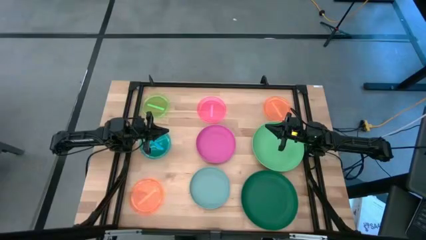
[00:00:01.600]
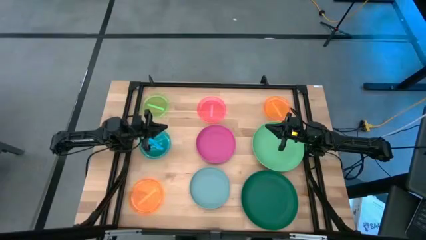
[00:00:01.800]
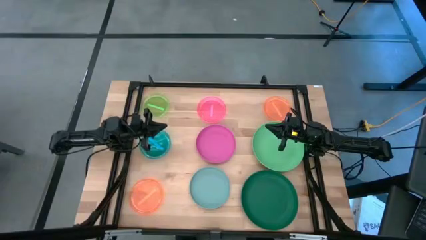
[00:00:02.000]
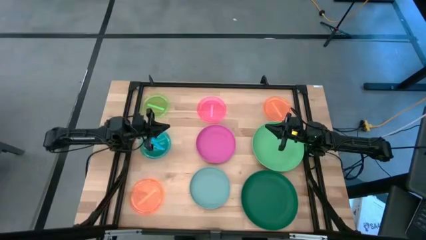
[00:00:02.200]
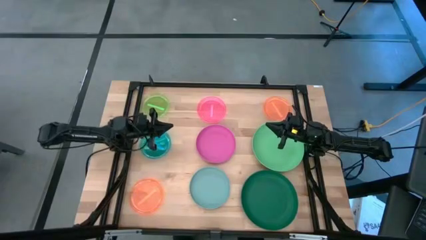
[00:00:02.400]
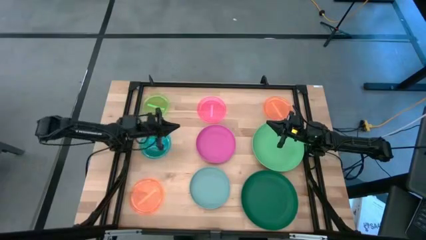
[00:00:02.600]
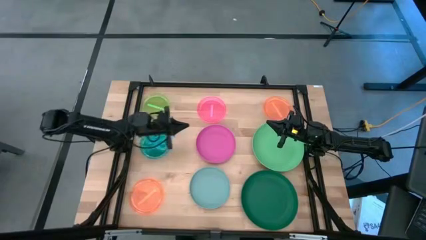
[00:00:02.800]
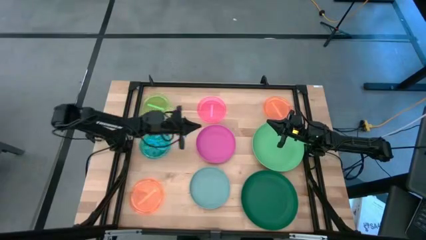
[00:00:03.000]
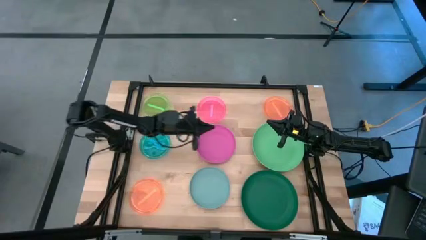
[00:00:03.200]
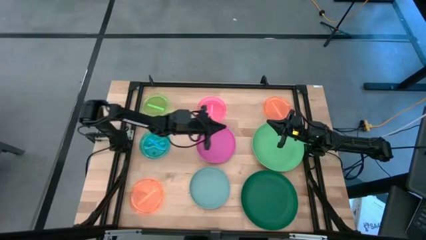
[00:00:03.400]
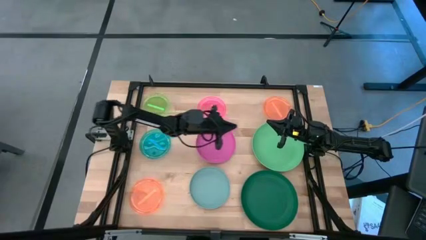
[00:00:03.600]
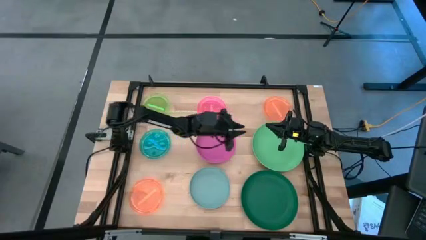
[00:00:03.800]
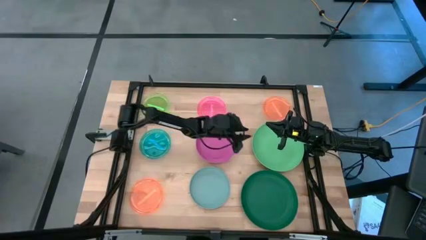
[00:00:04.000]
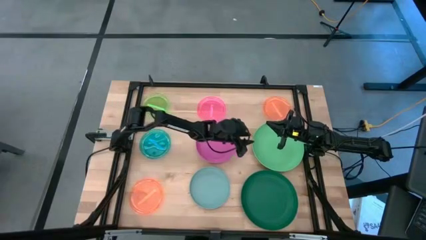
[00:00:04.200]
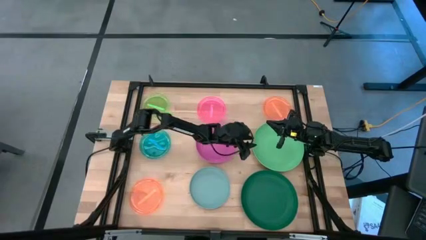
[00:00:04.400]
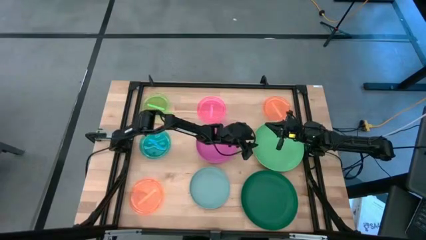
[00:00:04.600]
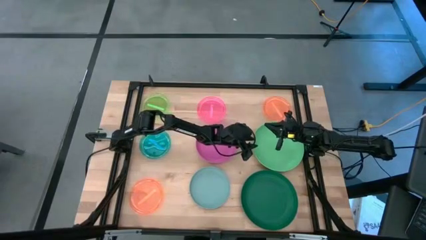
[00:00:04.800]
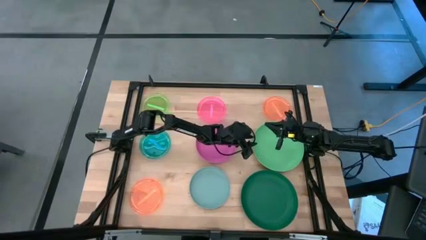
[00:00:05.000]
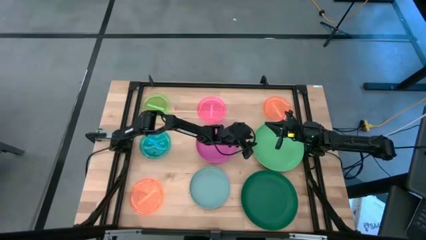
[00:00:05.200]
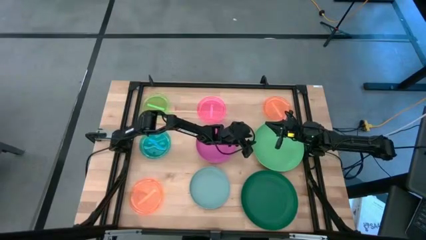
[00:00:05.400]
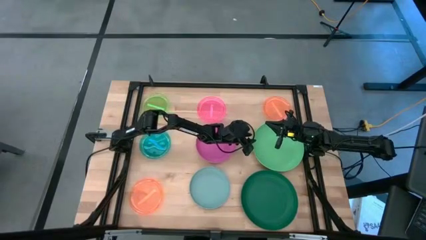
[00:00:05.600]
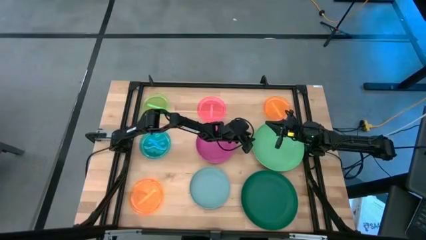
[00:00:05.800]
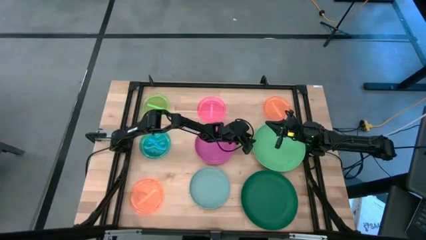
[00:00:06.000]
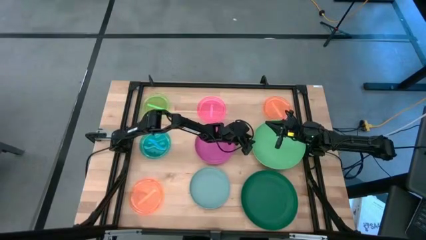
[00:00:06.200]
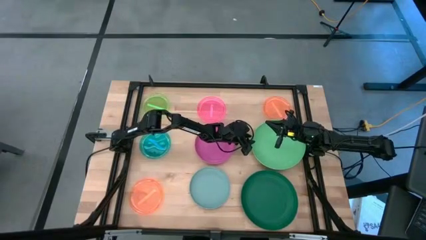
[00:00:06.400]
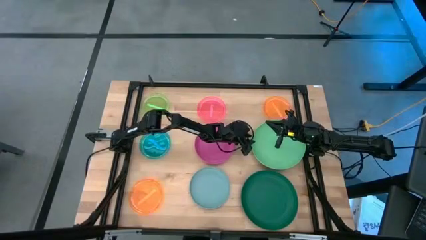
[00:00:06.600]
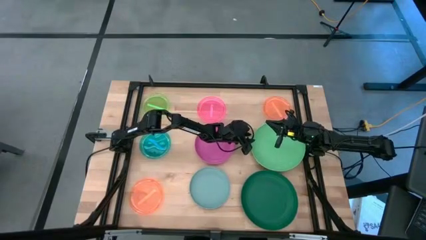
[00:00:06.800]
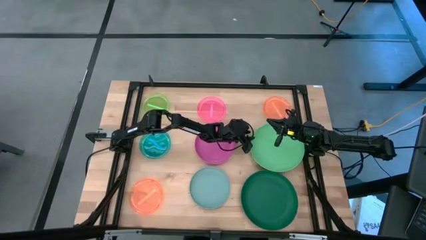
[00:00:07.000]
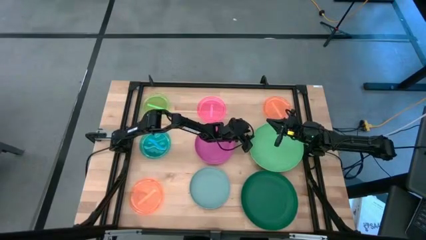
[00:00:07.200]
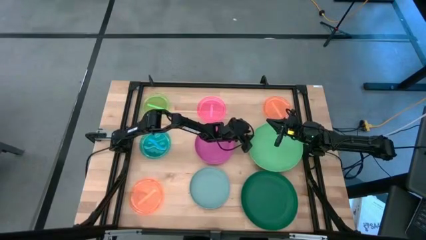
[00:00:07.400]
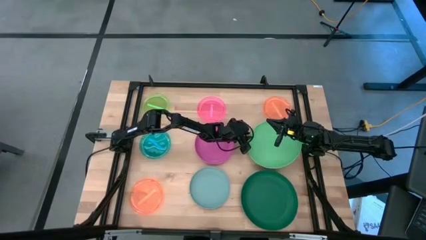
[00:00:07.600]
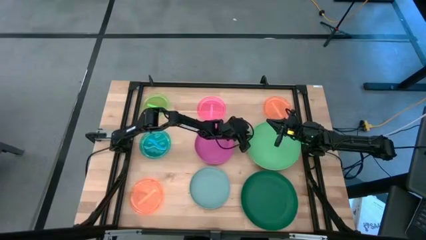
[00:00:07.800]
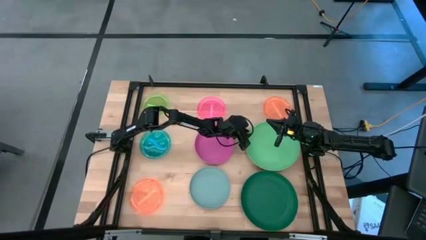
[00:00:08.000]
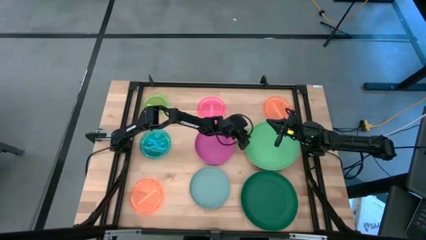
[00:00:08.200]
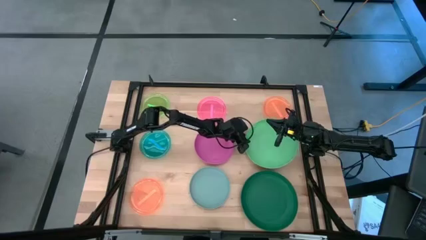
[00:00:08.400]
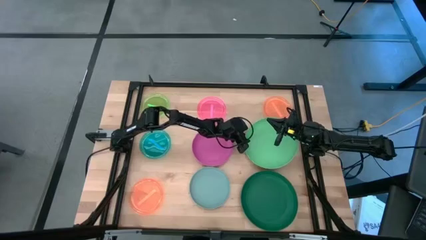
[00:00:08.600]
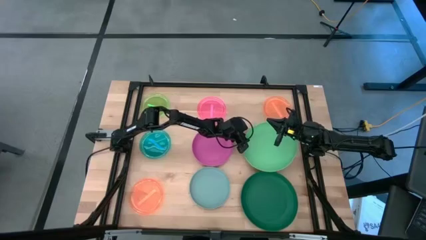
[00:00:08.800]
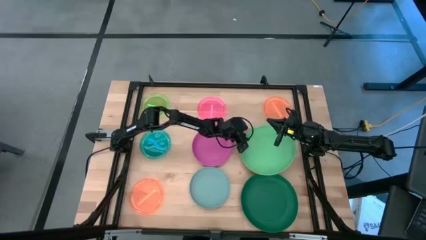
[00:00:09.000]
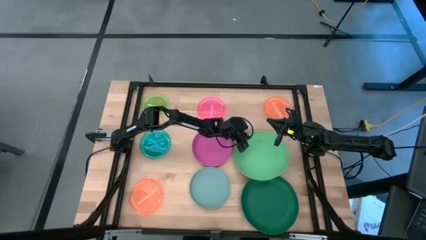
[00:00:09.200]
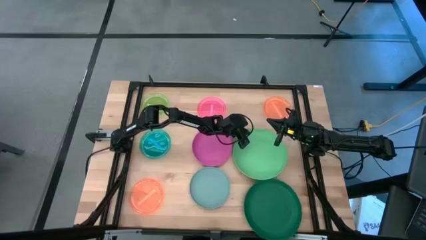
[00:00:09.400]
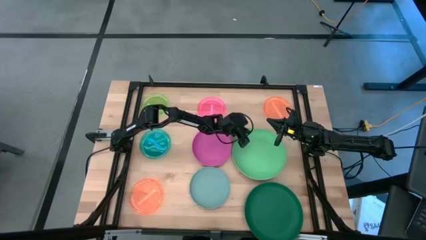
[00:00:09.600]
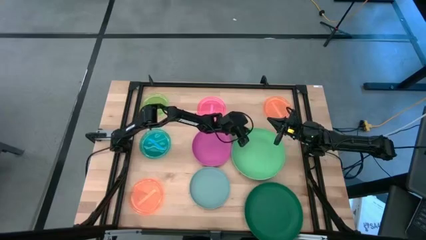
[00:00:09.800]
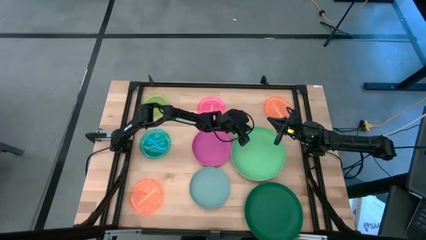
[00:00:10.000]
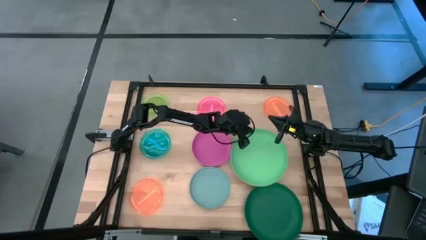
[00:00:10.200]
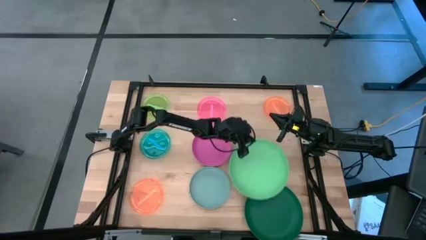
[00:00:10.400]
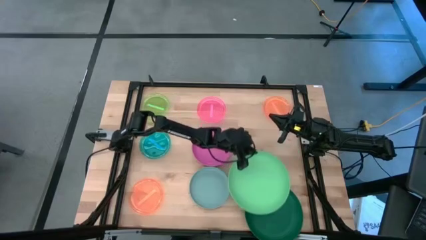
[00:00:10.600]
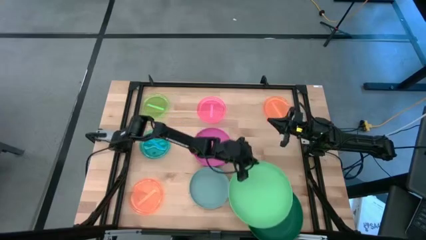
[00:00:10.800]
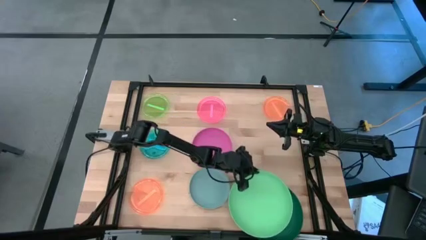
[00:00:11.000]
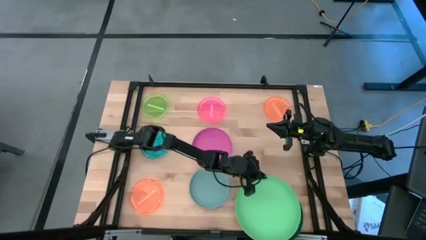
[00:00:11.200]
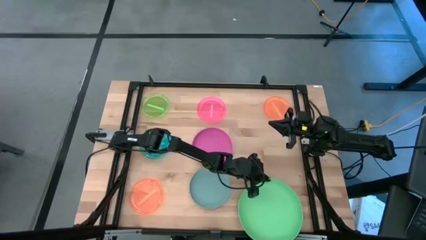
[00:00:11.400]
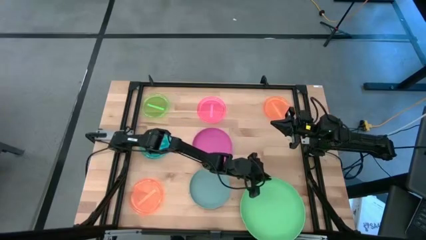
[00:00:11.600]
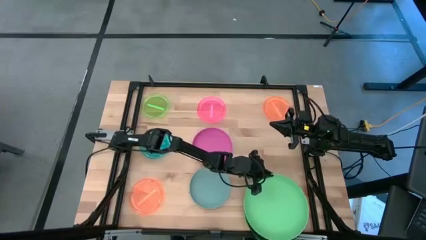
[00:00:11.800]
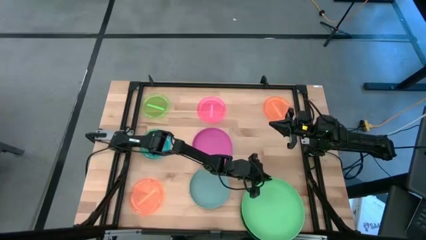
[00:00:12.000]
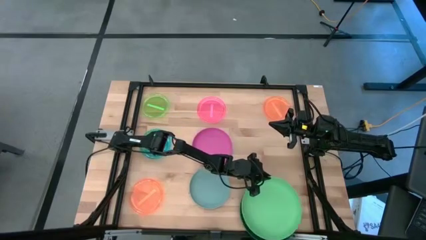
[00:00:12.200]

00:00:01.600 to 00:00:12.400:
Task: Stack plastic plates
Stack the green plate on the dark green plate

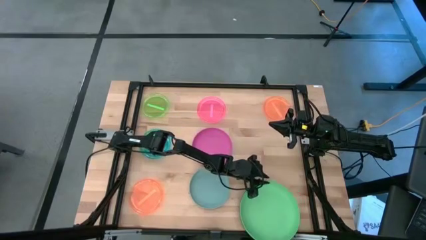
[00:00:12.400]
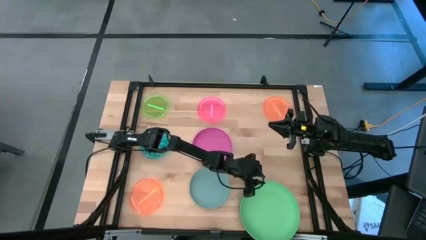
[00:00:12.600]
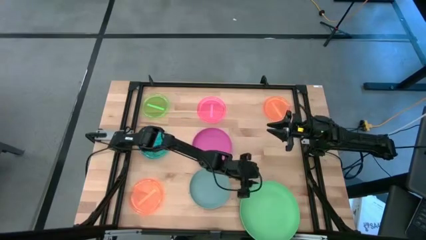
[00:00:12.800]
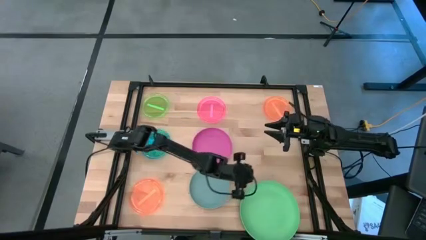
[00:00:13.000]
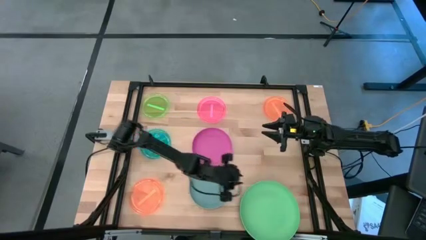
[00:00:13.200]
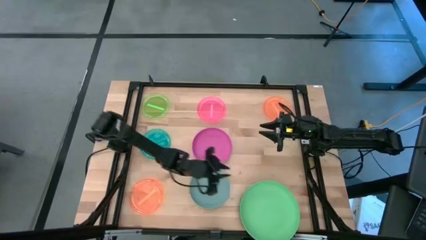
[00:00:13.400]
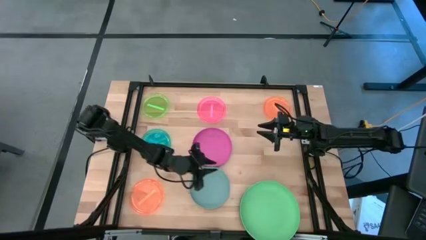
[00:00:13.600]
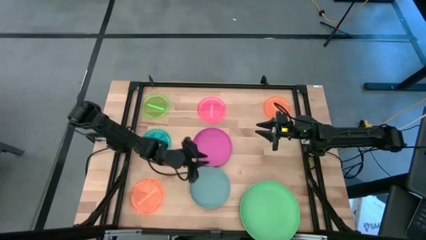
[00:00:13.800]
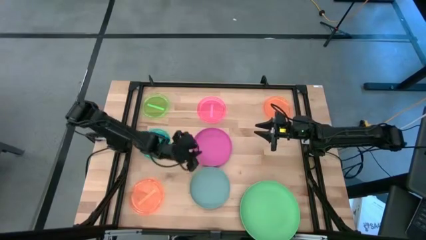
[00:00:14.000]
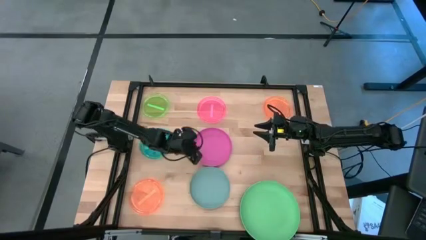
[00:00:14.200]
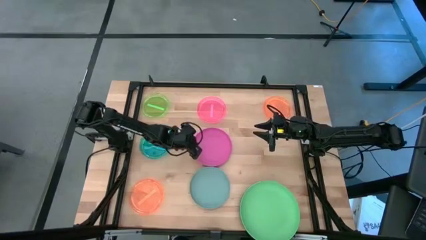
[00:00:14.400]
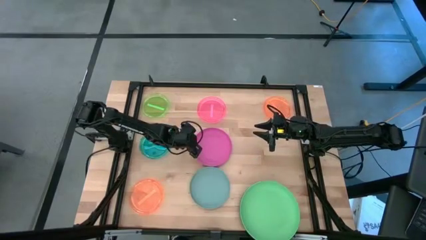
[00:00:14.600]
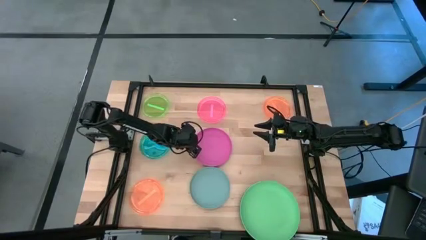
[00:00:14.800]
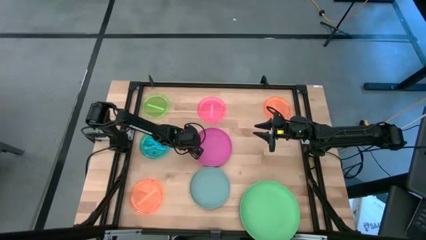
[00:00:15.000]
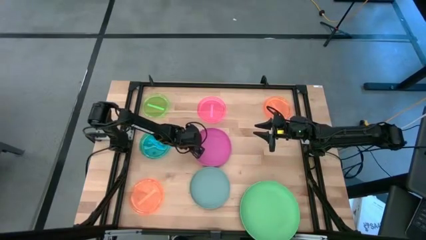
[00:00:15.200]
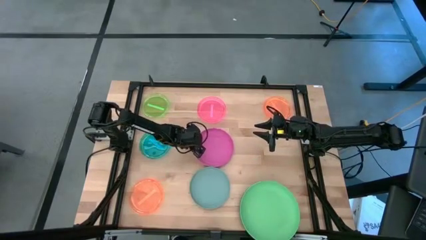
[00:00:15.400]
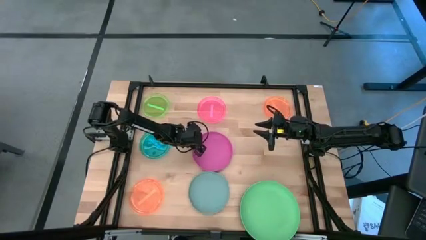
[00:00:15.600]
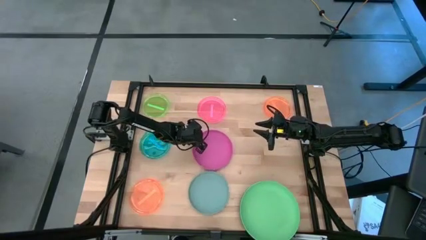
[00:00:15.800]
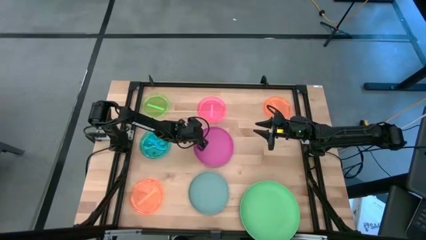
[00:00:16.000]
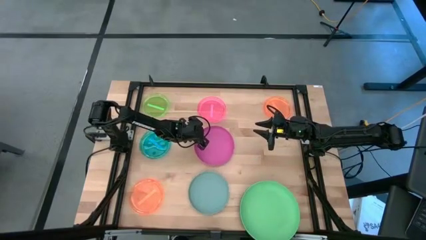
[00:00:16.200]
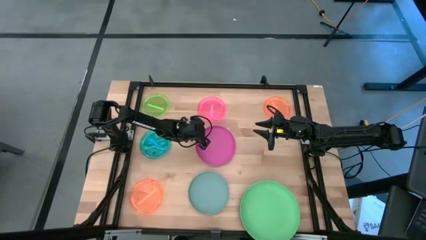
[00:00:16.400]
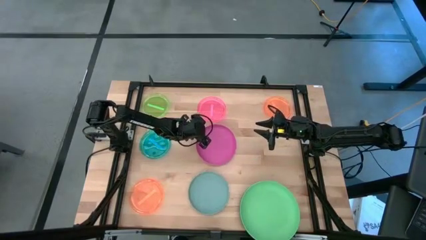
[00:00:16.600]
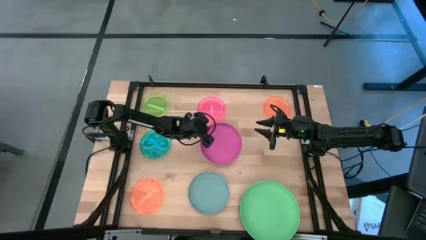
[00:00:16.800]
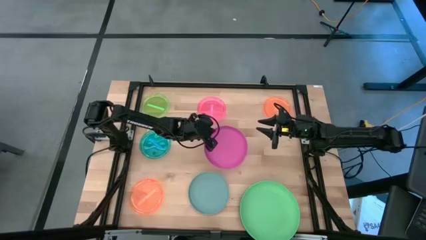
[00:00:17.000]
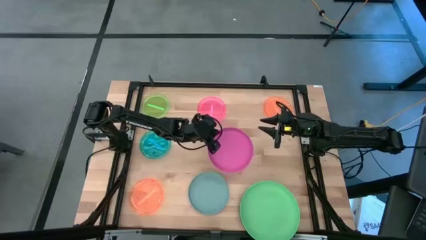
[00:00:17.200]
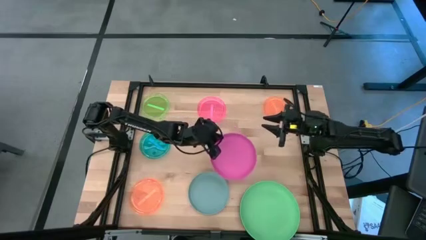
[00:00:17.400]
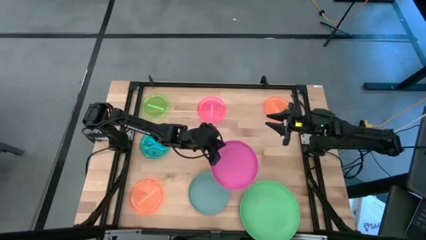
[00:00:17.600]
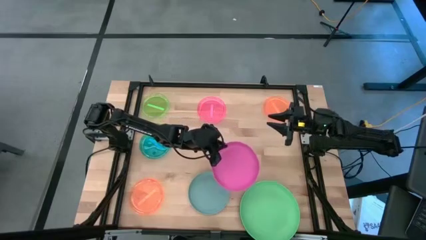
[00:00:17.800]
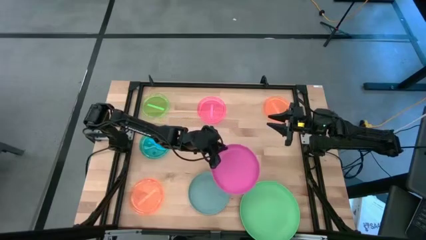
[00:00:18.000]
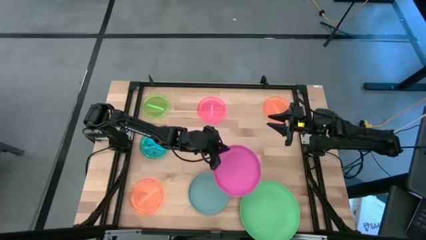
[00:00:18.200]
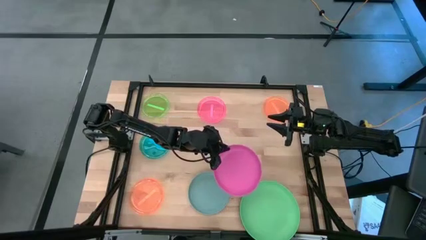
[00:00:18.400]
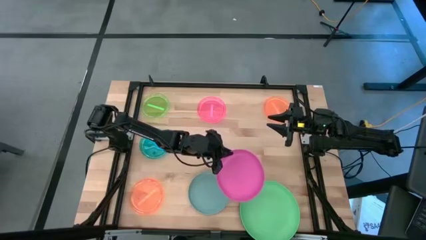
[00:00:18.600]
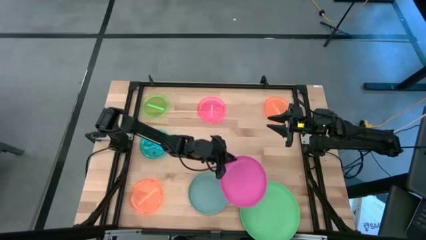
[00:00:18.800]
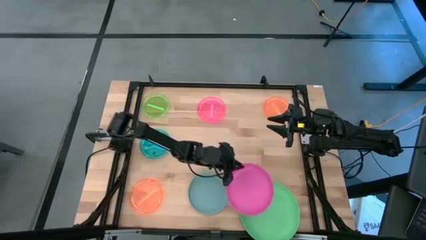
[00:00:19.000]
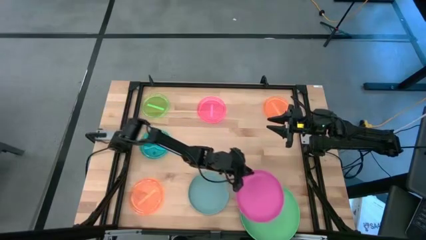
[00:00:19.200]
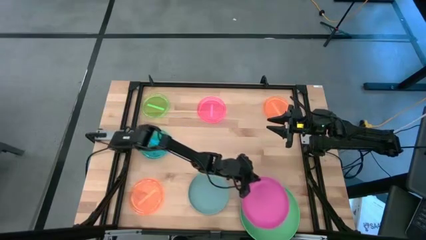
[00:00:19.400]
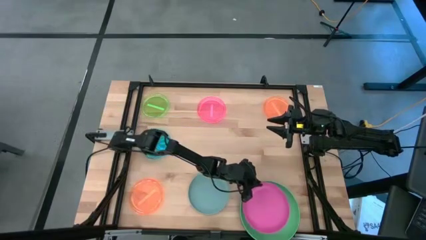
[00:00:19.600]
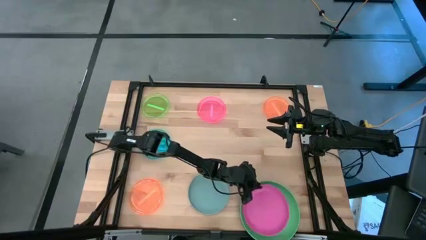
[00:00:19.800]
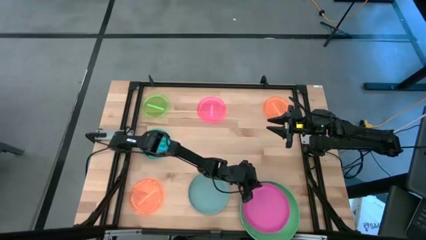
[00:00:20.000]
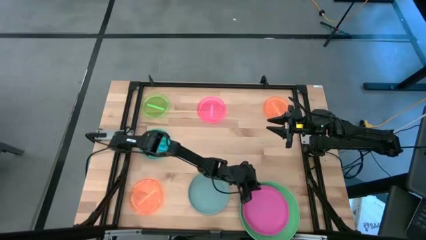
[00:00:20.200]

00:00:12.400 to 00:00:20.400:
Stack the pink plate on the green plate
